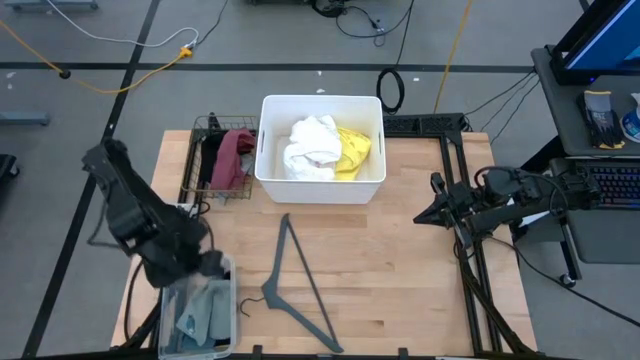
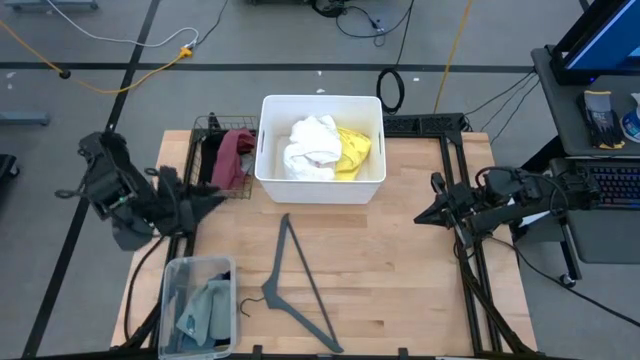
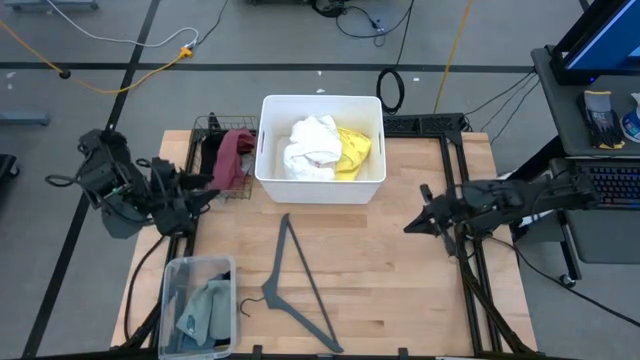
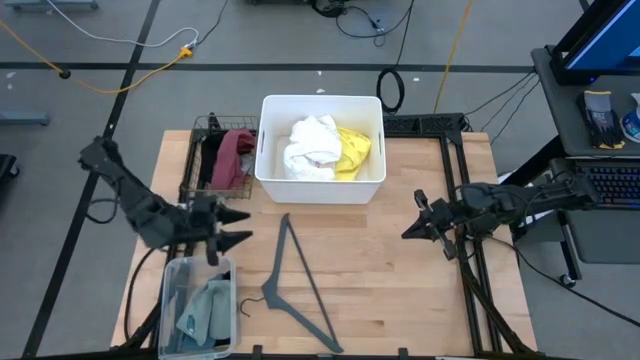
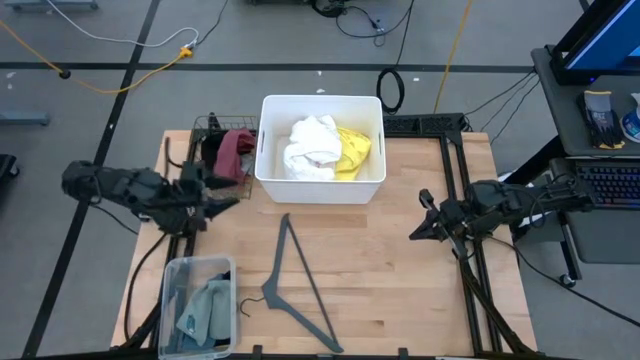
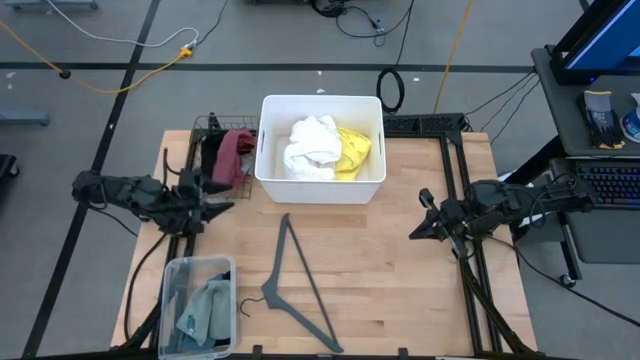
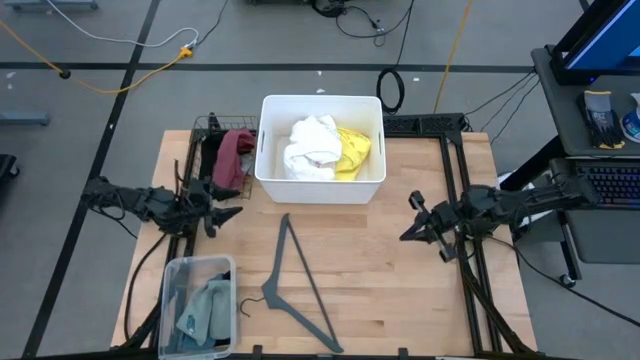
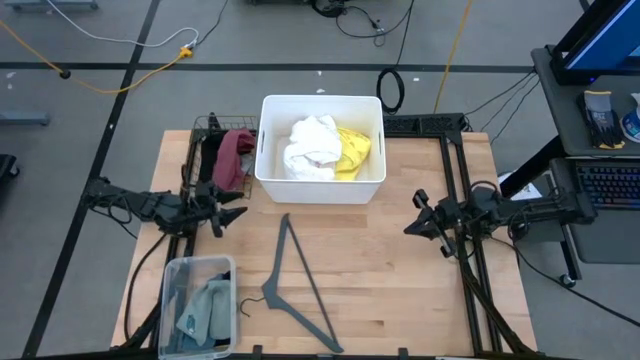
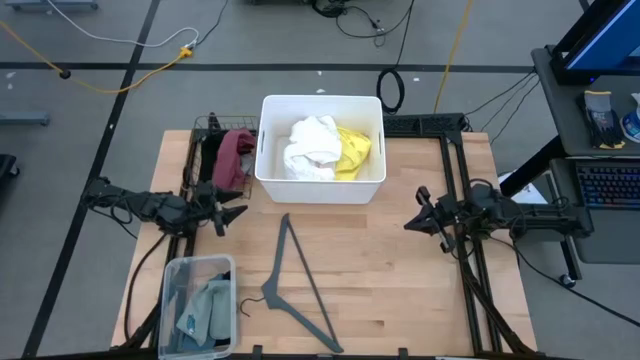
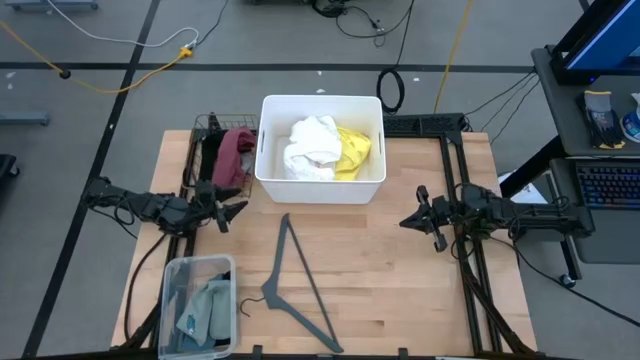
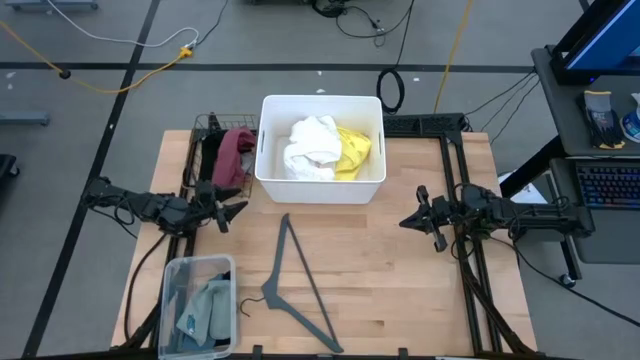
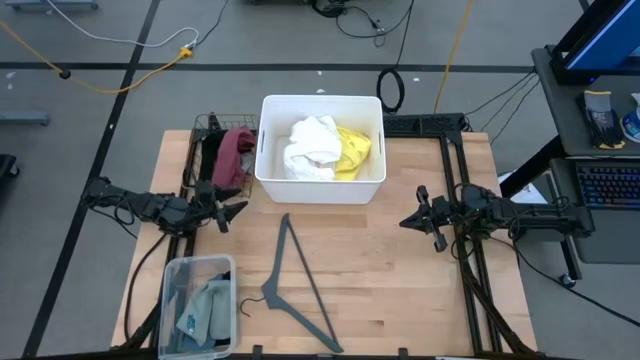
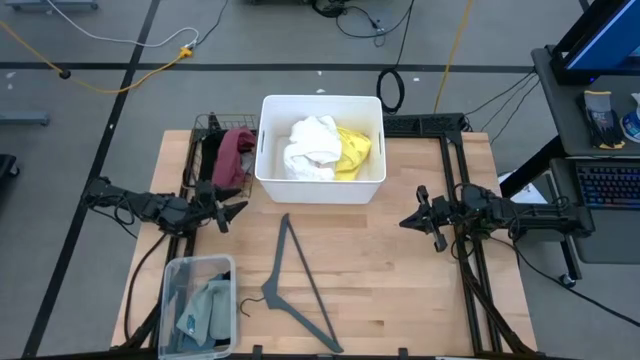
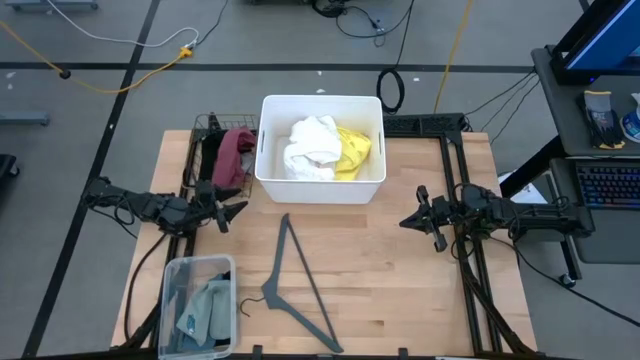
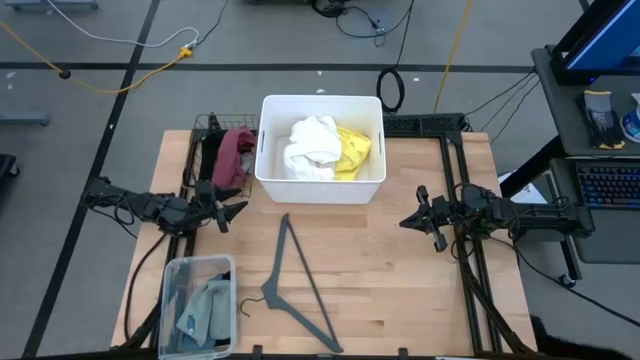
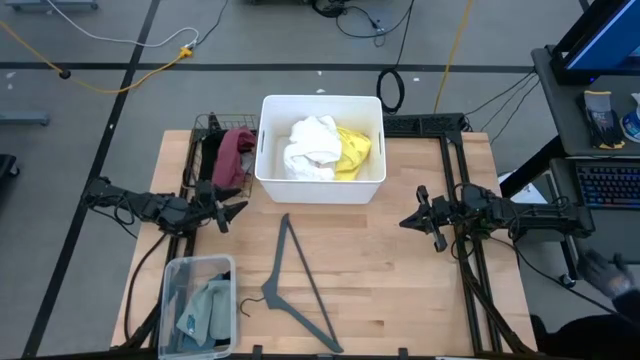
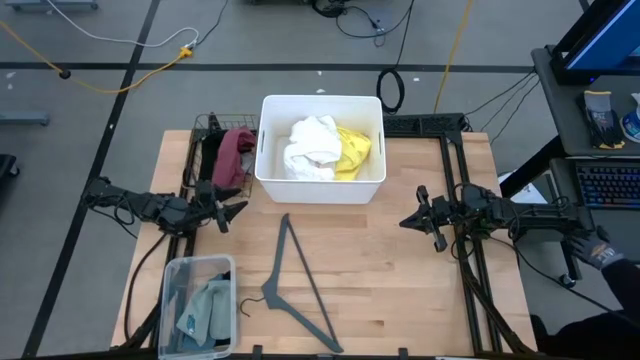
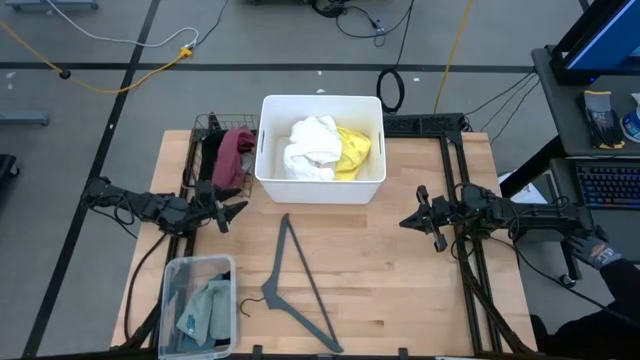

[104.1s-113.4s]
Task: Pick & Place Cloths
Return to Home Position

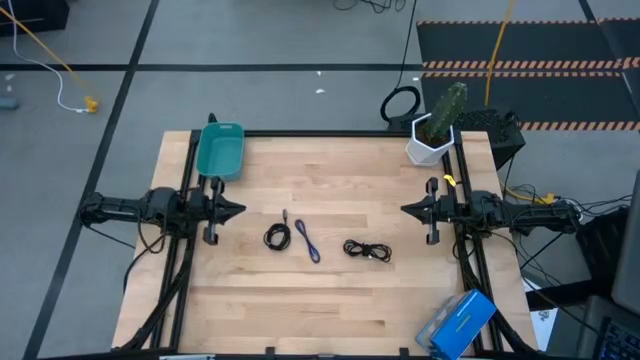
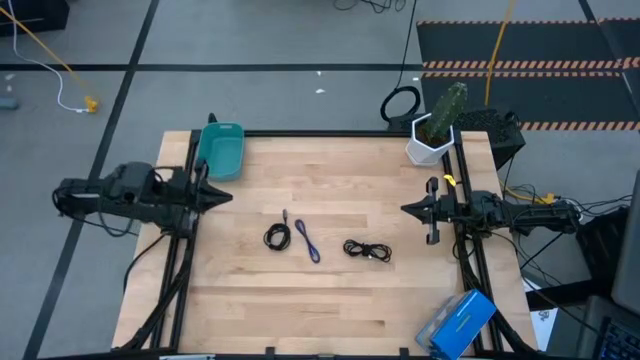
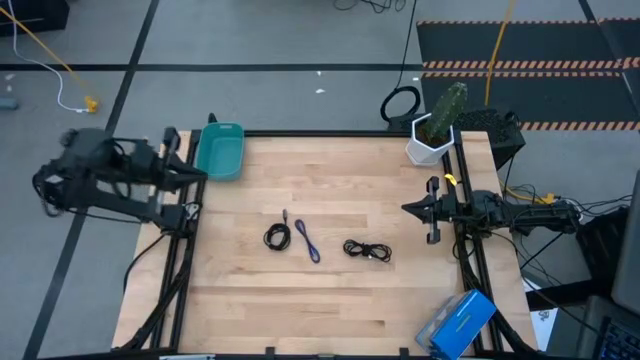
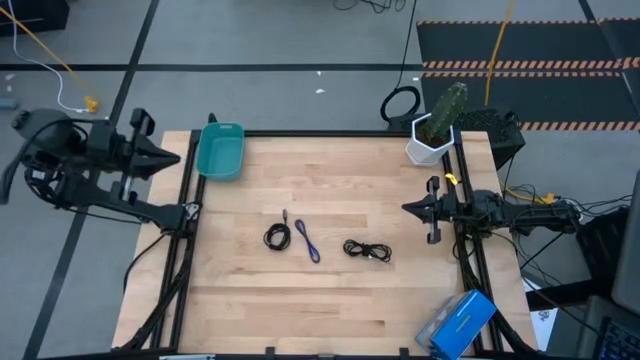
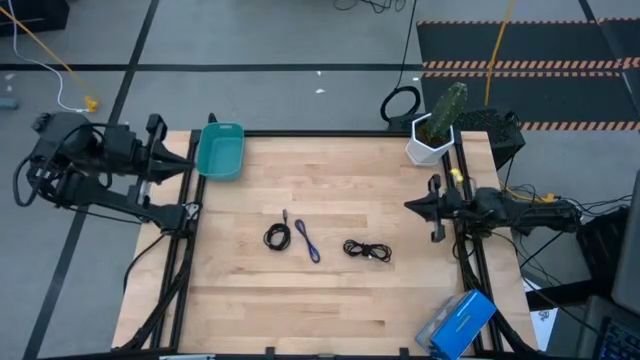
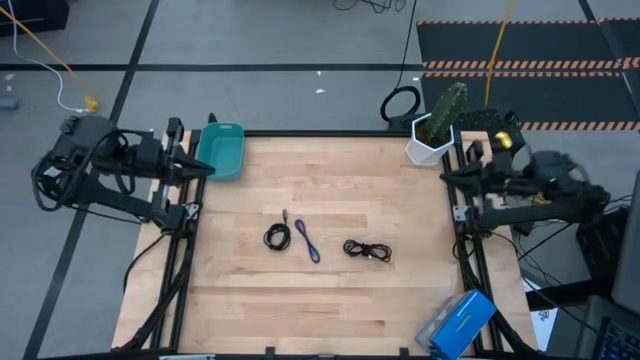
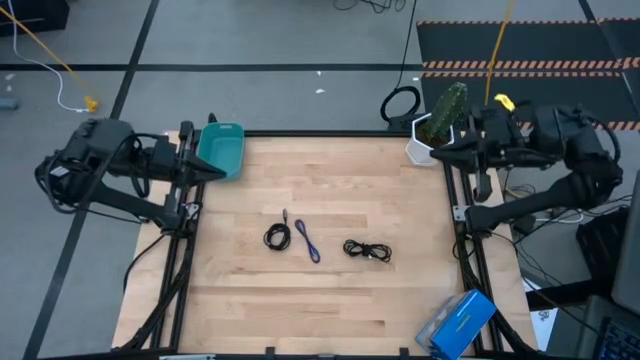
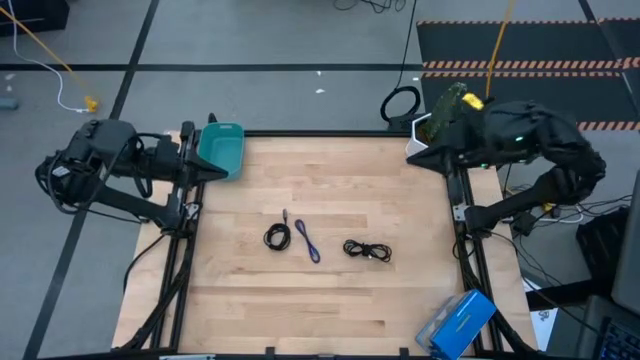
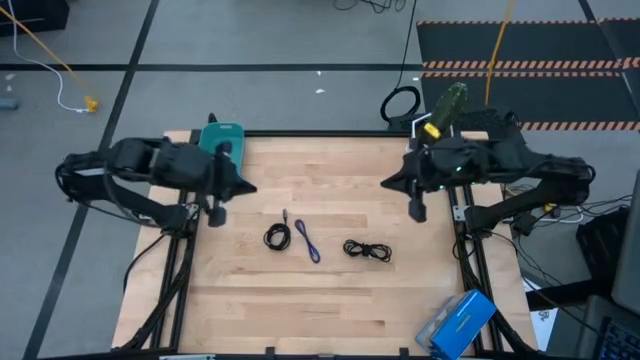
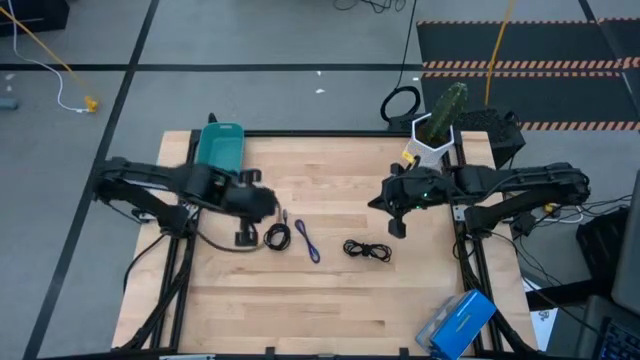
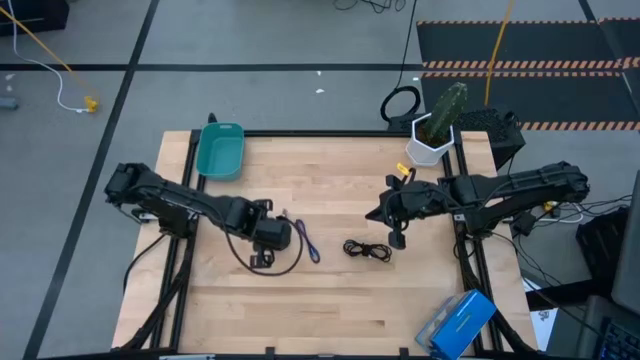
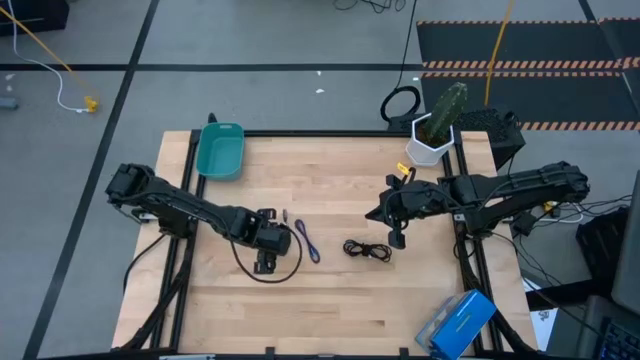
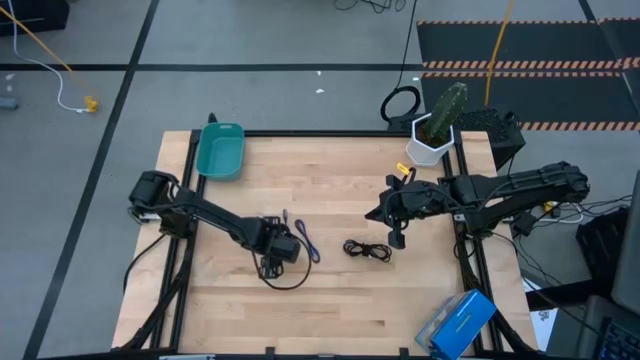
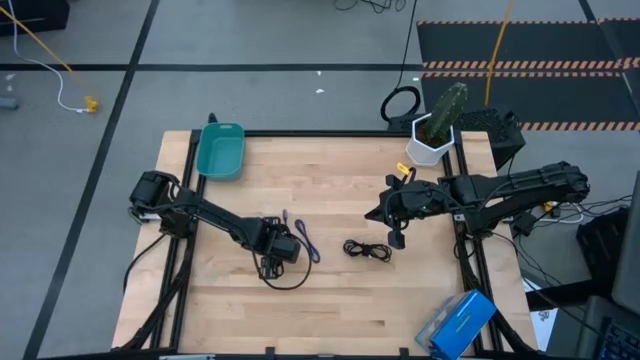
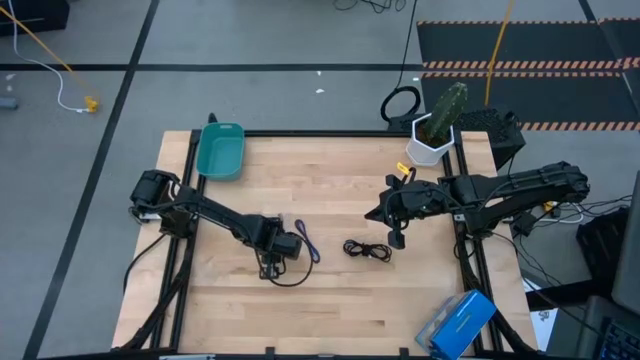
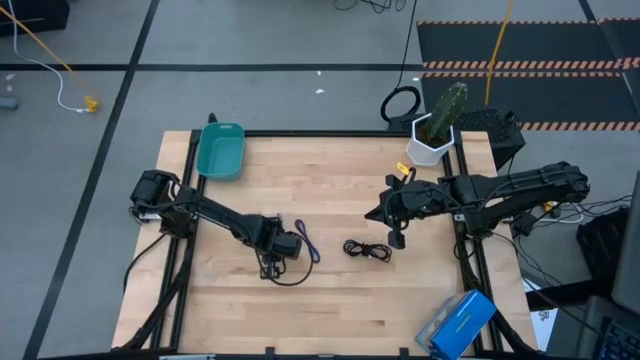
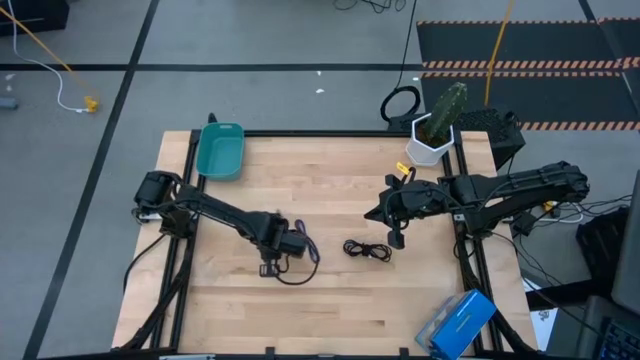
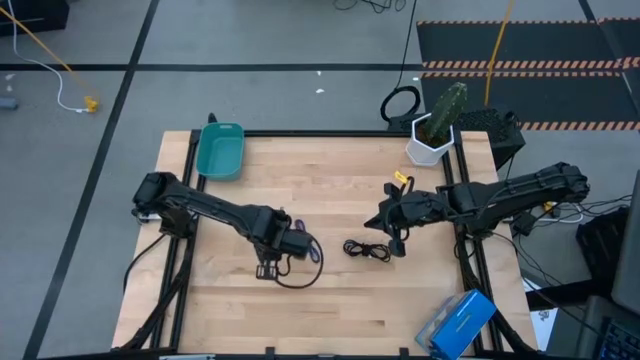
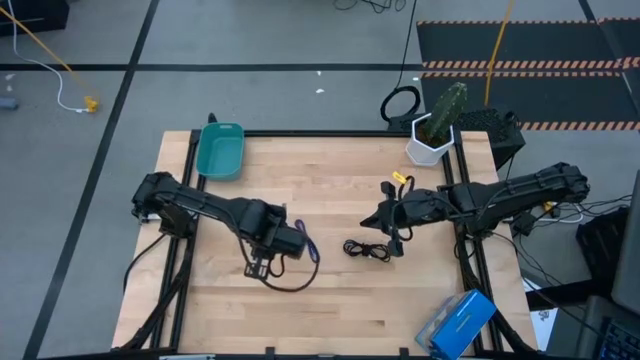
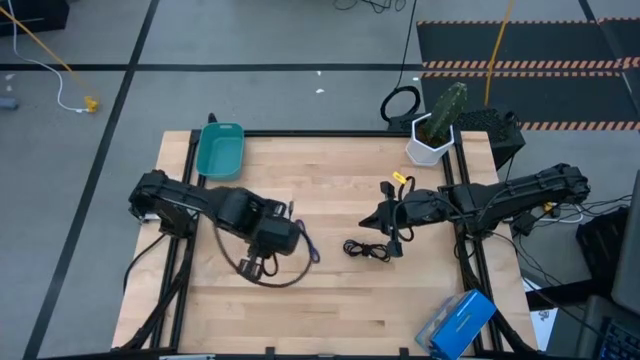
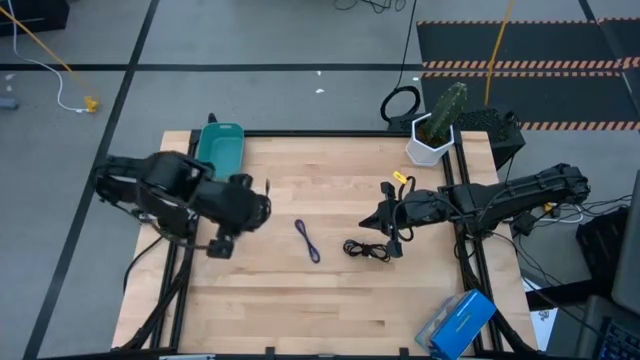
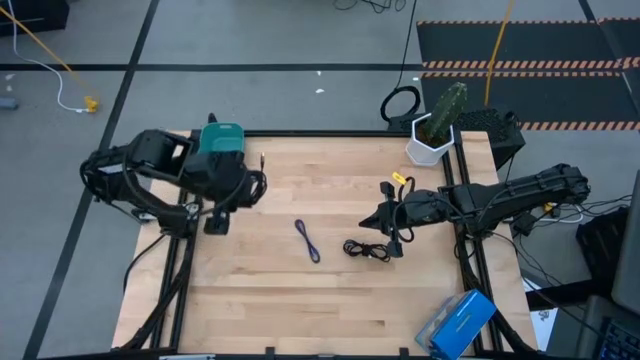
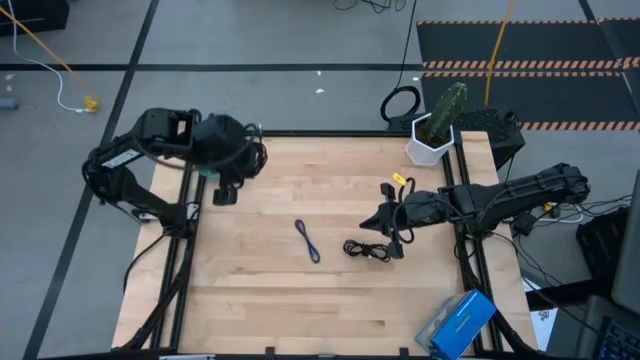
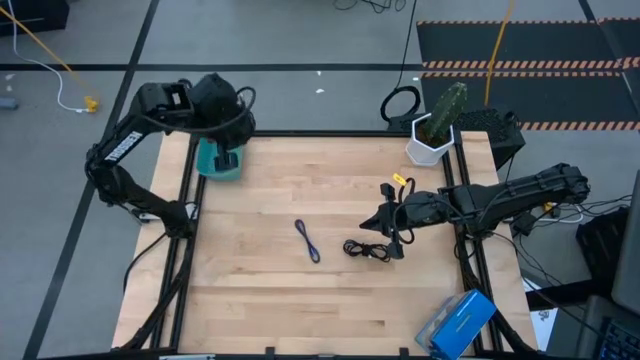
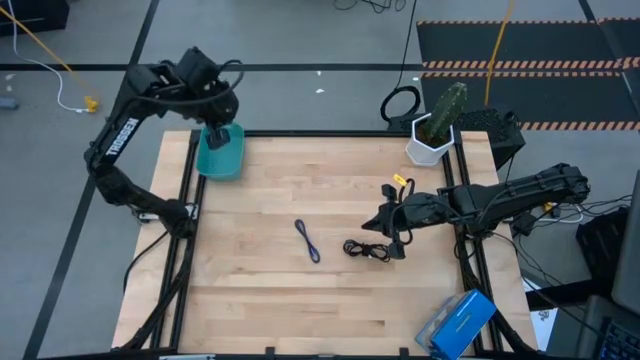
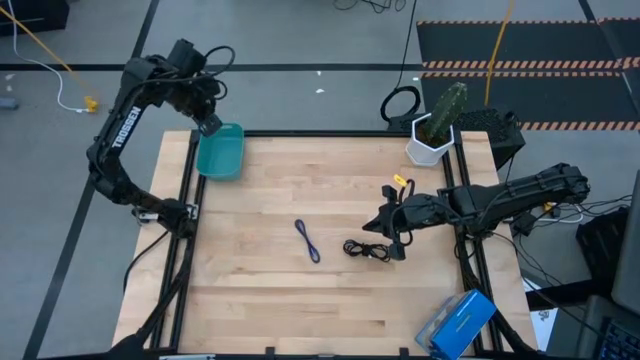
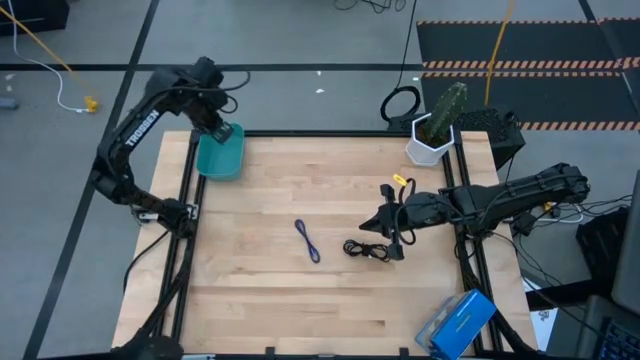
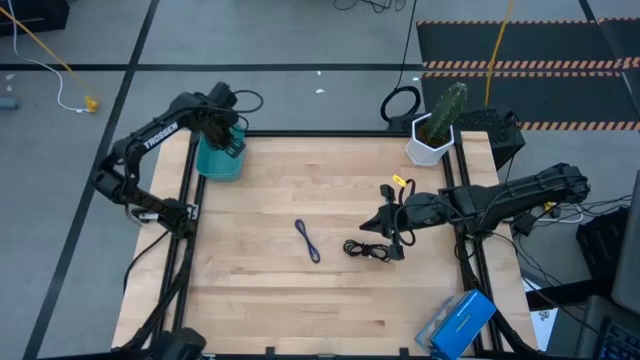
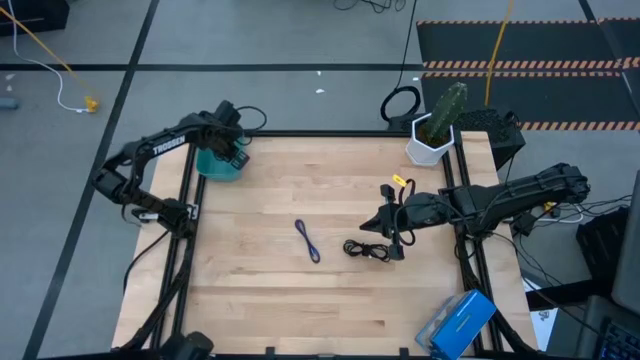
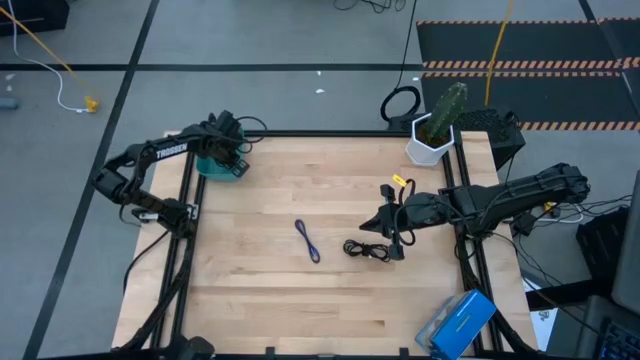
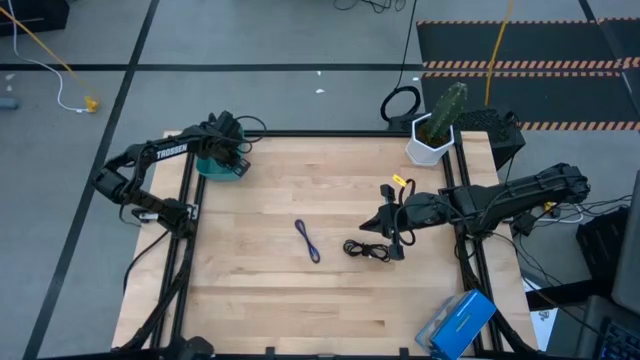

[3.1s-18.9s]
Task: Pick and place USB-C Cables
Put the black HDMI cable into the blue bin
